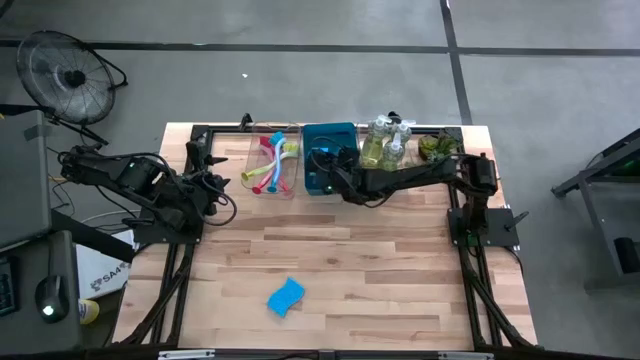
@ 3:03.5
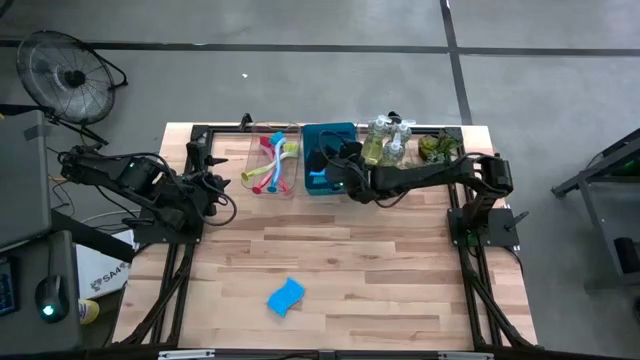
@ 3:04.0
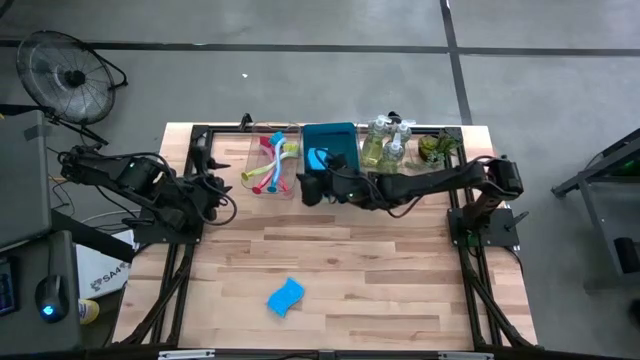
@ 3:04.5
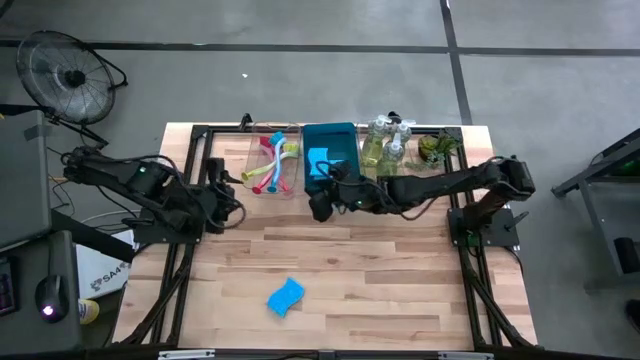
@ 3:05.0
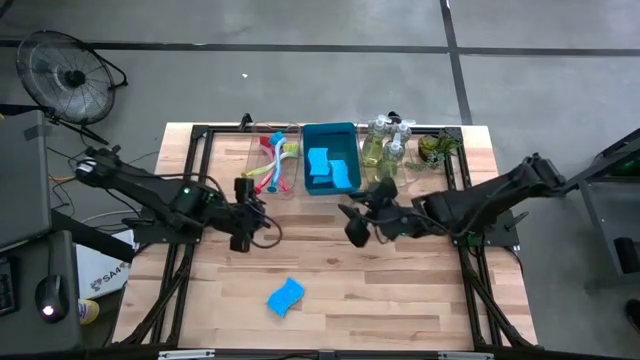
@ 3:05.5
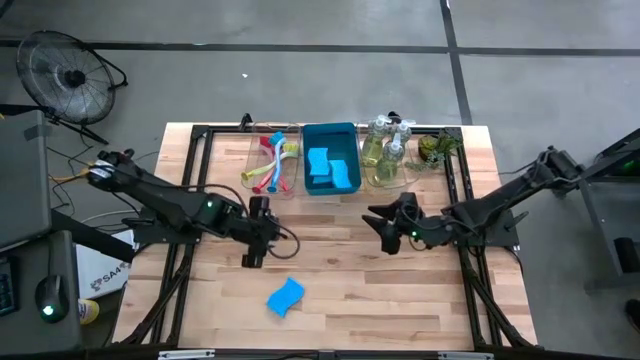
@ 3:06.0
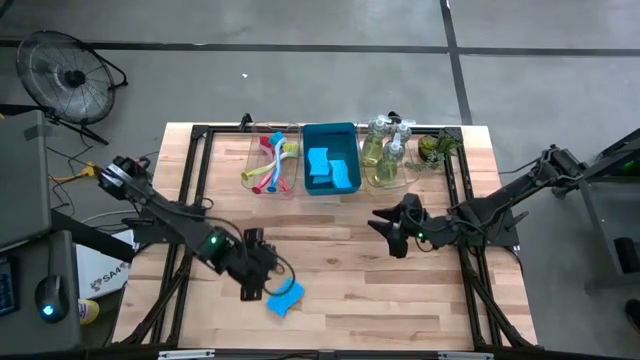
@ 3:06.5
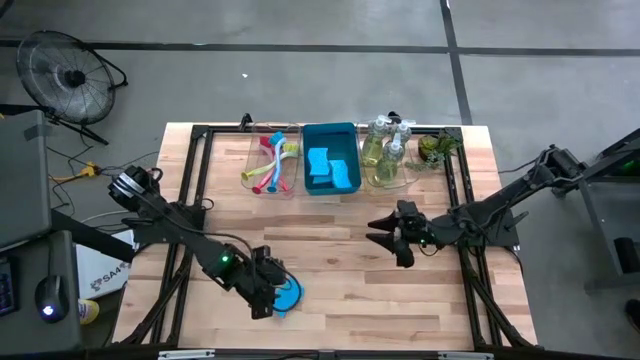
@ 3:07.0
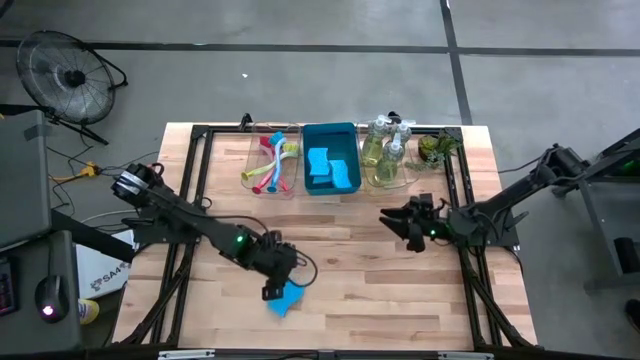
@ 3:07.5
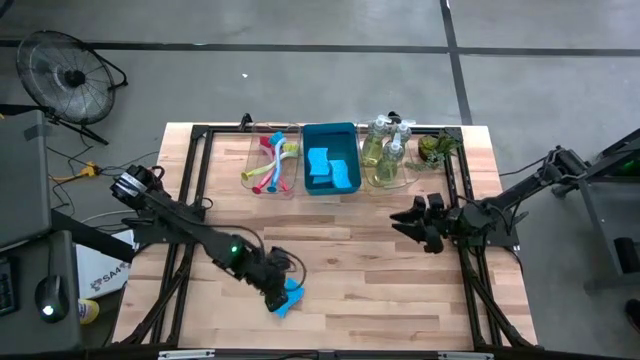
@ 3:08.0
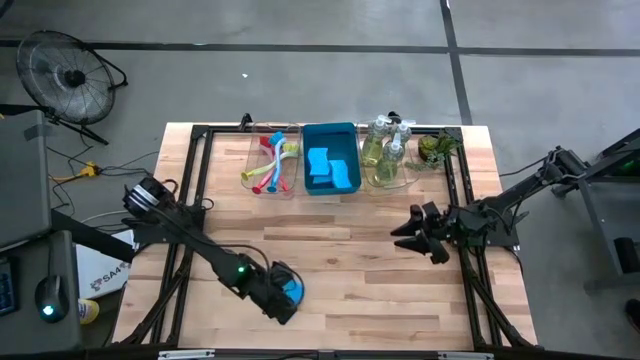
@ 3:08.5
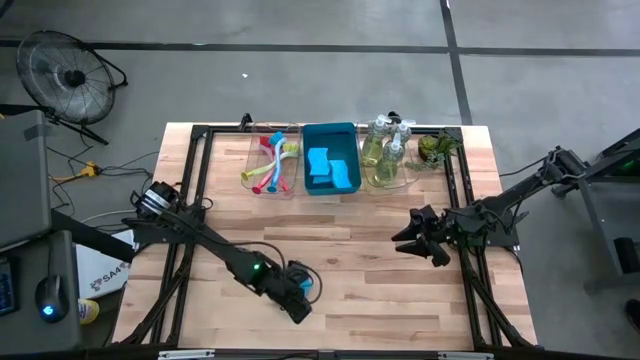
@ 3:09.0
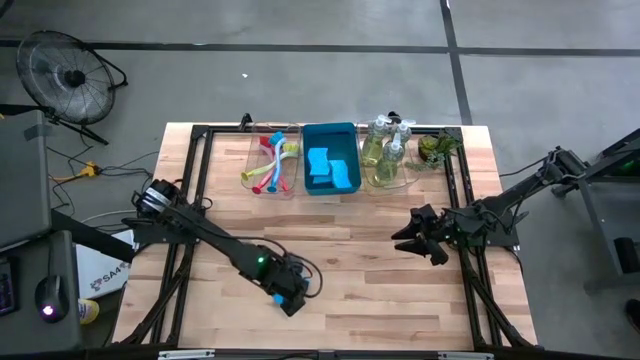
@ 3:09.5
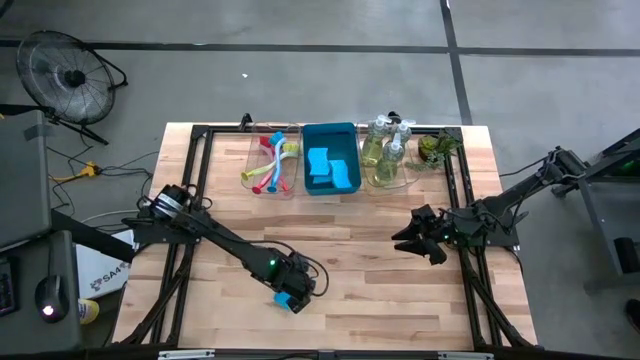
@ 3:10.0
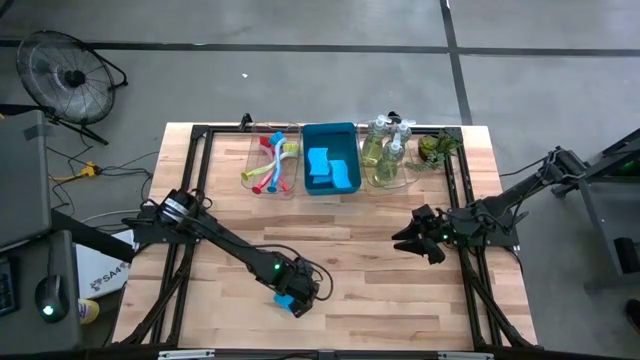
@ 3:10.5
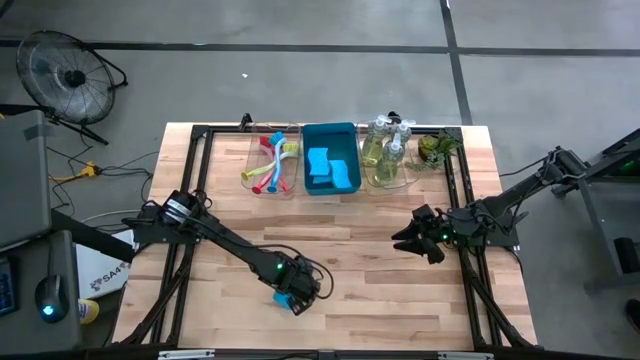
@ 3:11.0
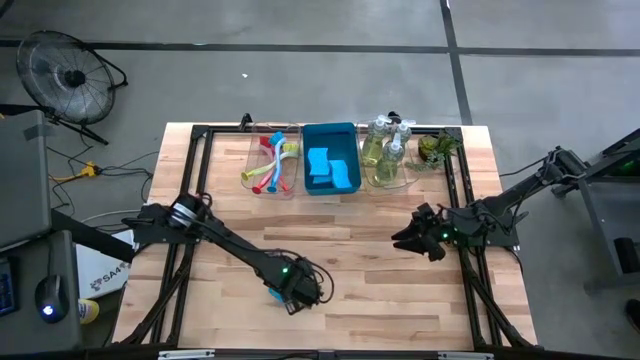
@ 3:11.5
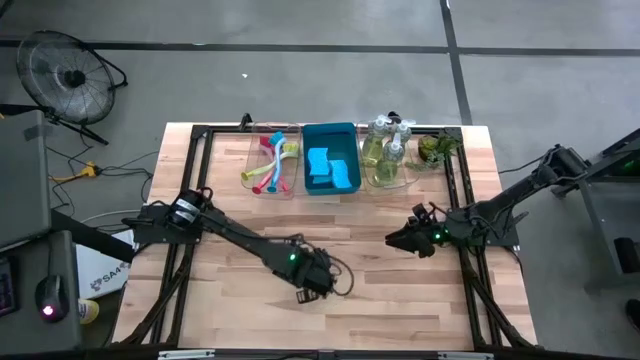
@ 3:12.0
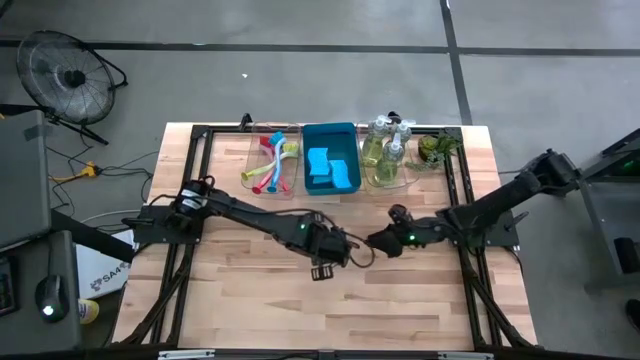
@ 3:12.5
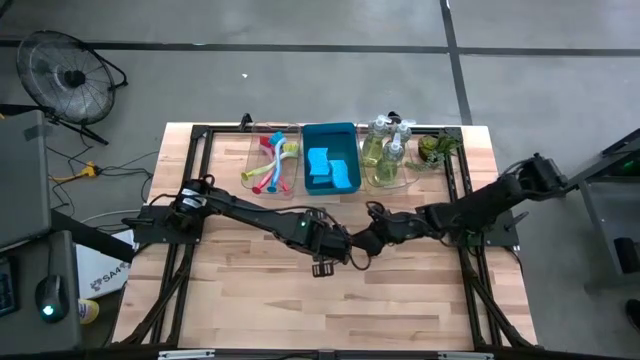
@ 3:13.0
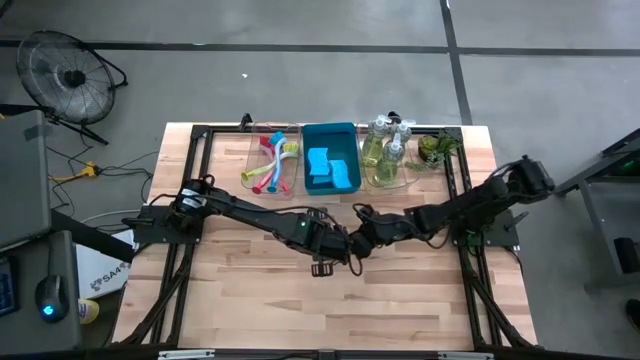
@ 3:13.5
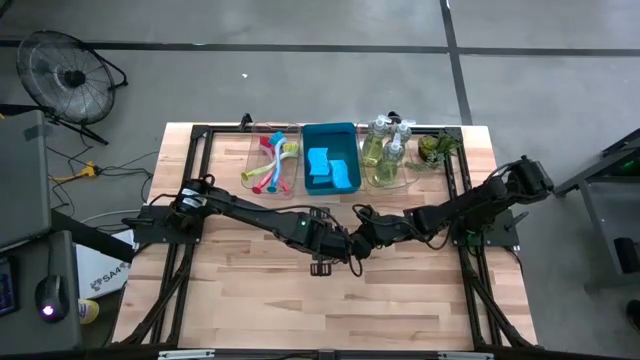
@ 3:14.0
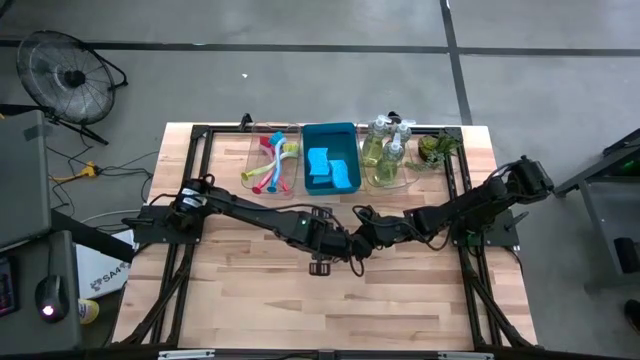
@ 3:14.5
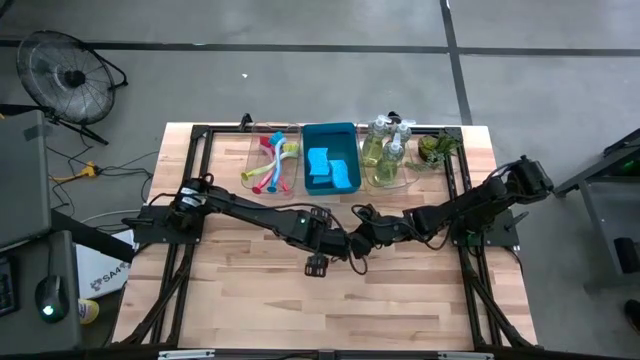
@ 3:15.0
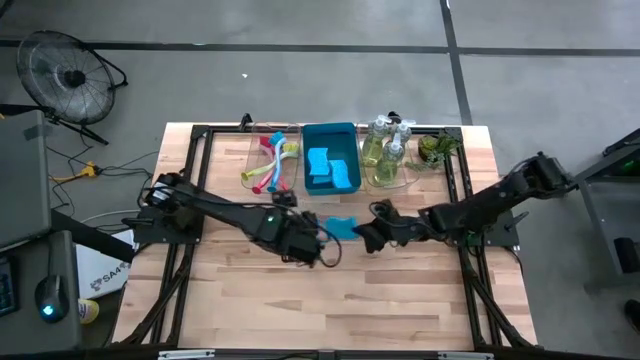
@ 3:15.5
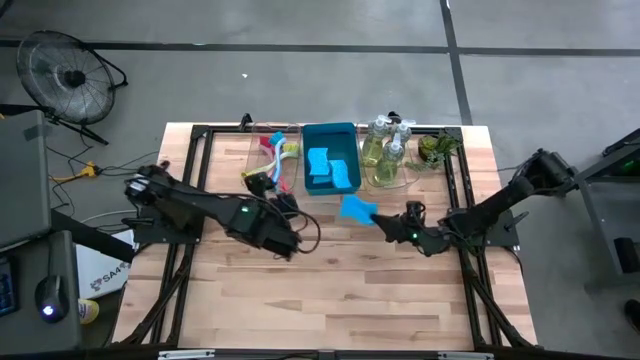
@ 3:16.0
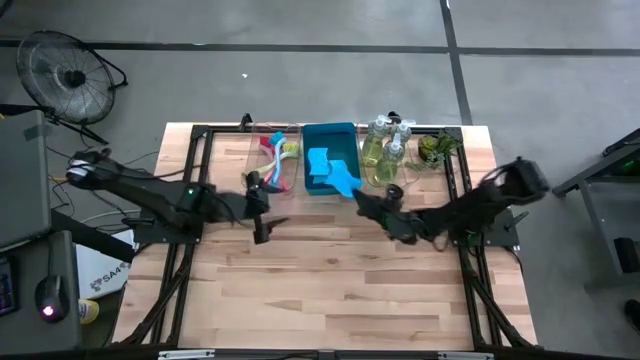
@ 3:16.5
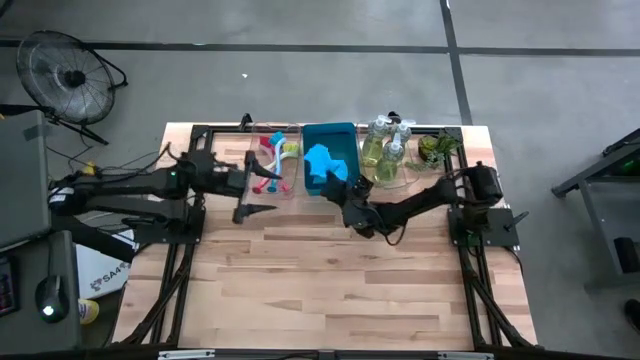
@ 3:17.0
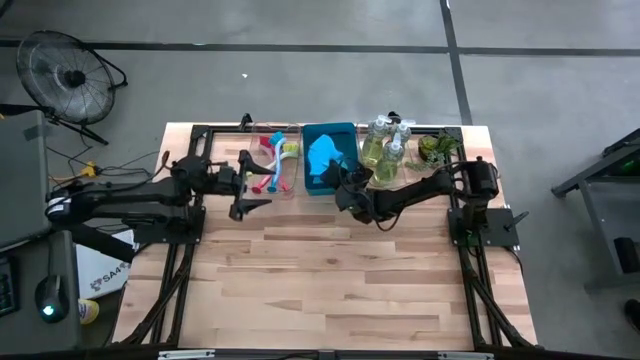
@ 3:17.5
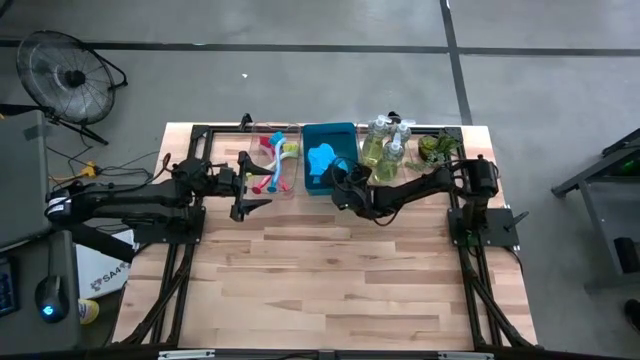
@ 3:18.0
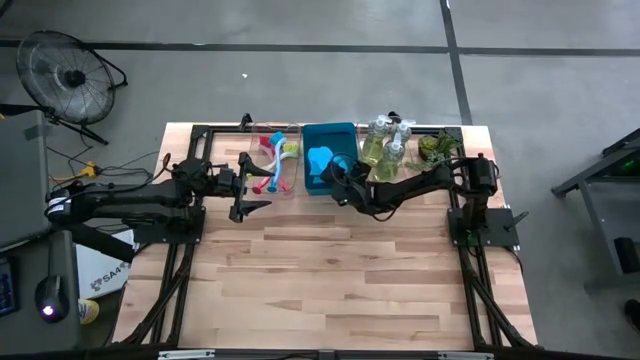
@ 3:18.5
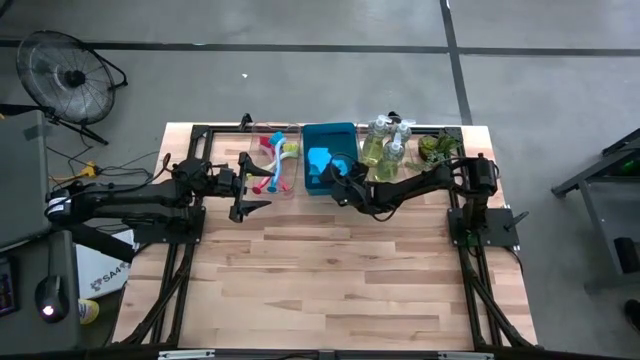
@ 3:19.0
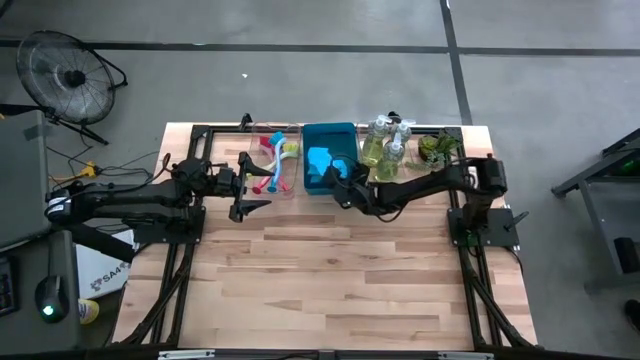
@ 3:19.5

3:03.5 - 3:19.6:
Task: Pick & Place Kitchen Sink Supplies
Put the blue sponge into the blue bin

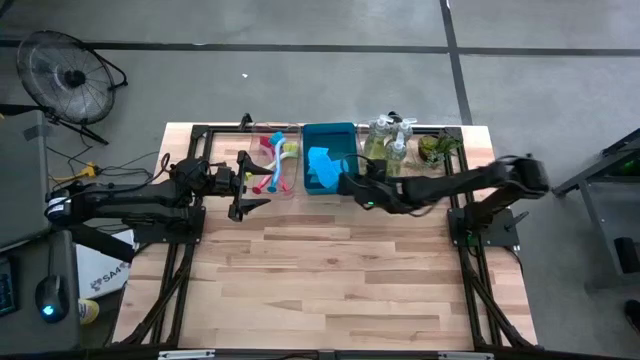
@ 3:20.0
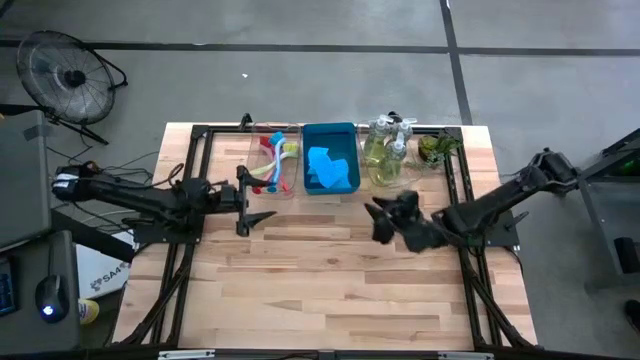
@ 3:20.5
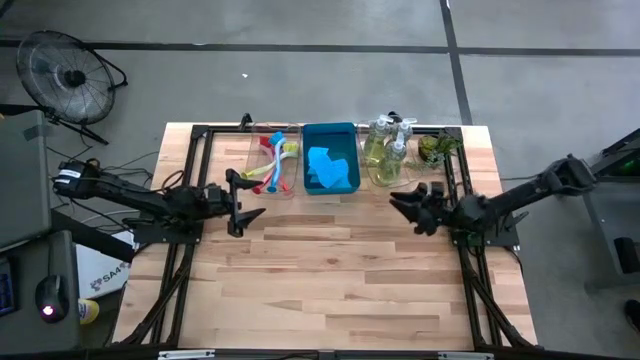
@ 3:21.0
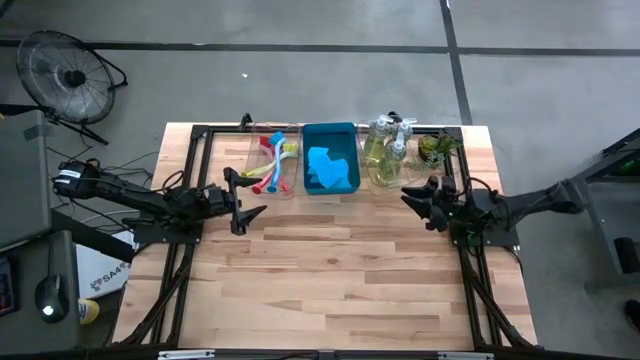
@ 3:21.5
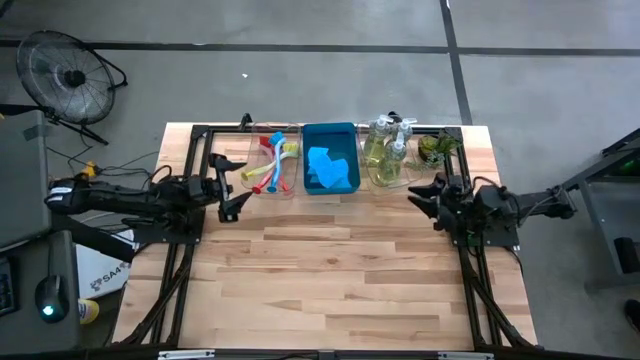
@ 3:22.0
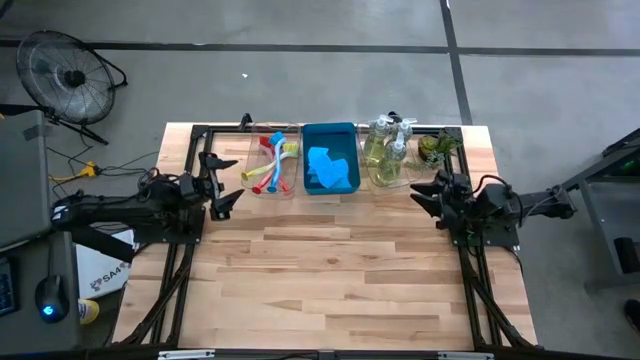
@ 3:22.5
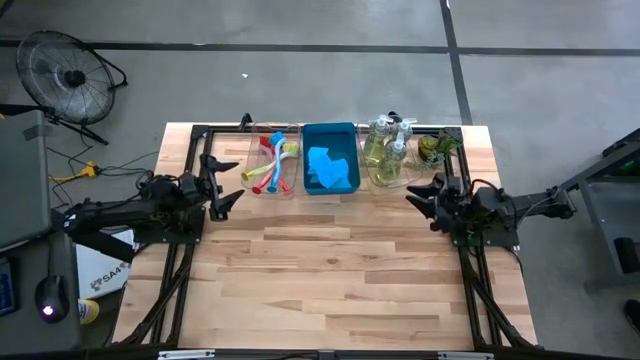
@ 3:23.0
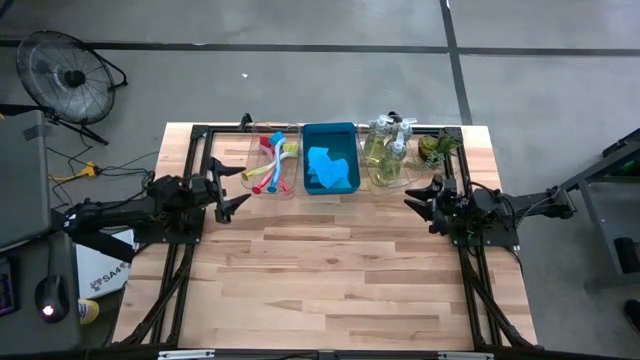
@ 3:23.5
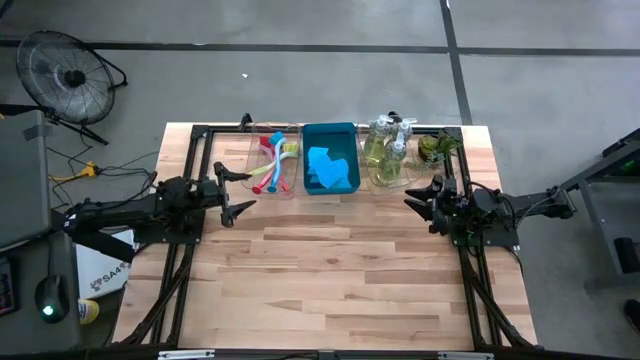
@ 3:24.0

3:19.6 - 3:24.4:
Return to Home Position
